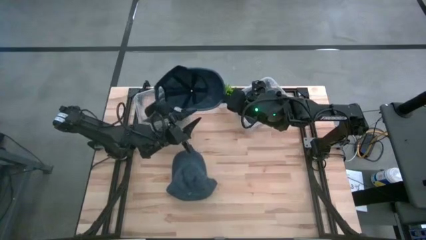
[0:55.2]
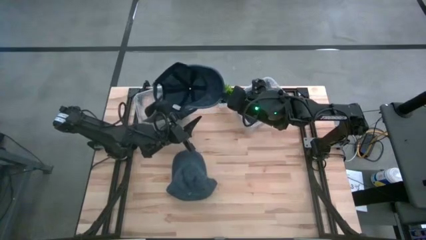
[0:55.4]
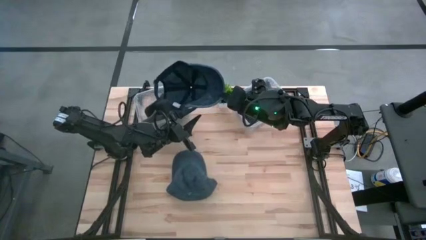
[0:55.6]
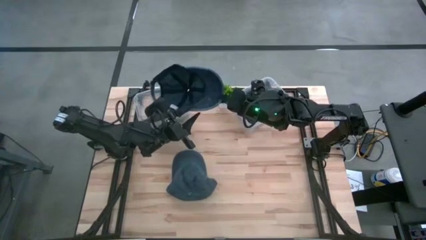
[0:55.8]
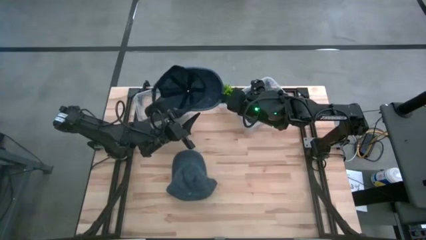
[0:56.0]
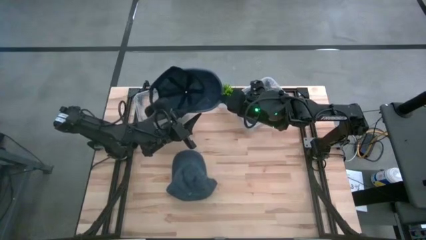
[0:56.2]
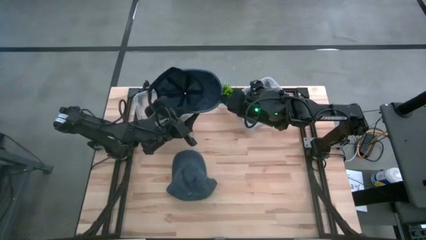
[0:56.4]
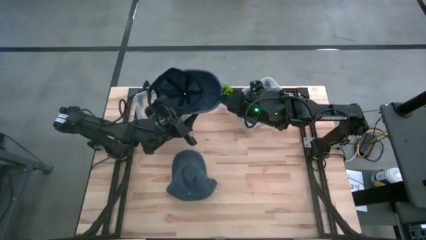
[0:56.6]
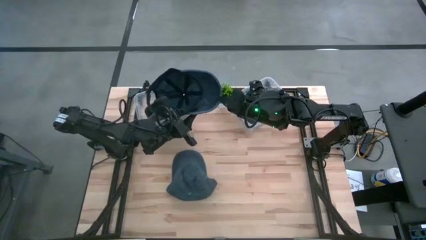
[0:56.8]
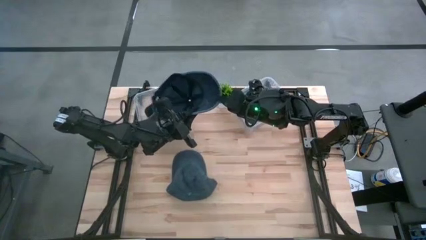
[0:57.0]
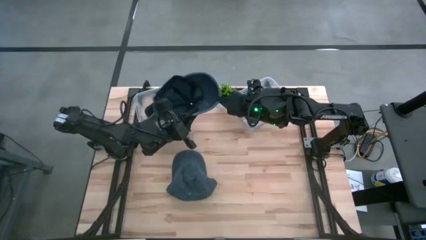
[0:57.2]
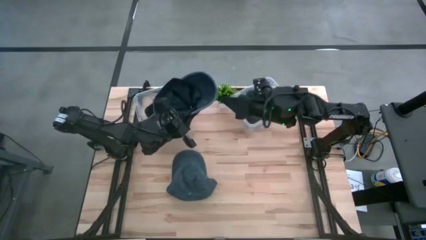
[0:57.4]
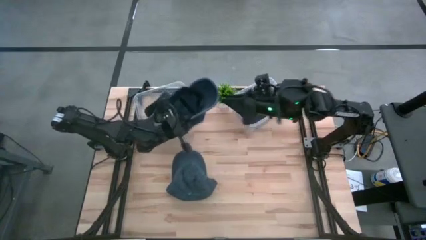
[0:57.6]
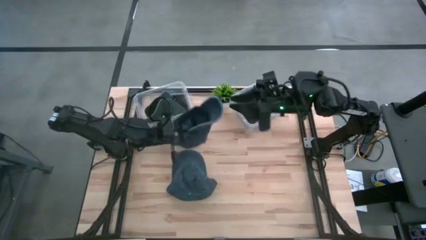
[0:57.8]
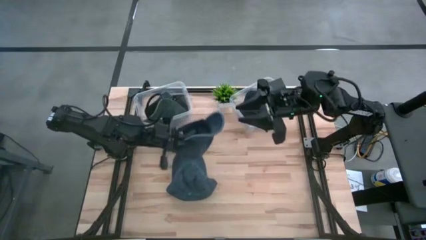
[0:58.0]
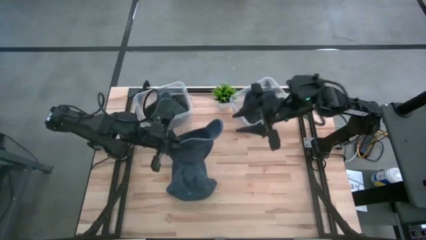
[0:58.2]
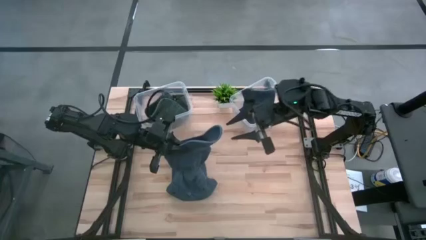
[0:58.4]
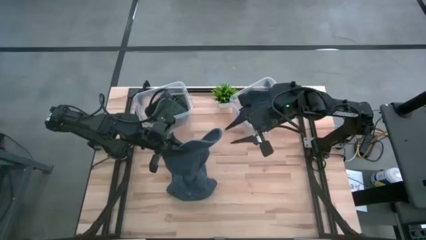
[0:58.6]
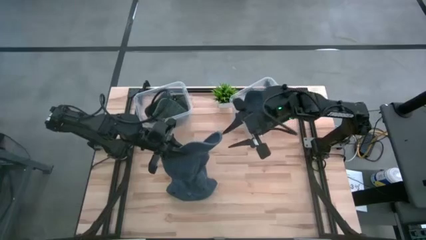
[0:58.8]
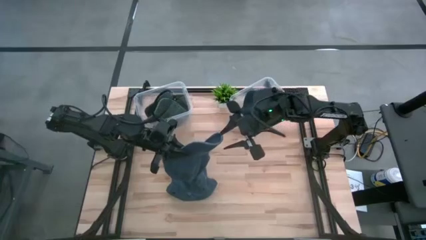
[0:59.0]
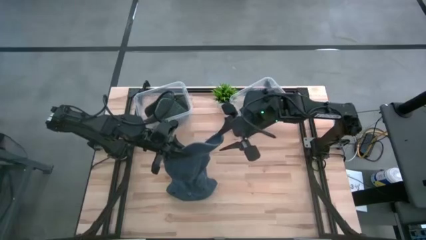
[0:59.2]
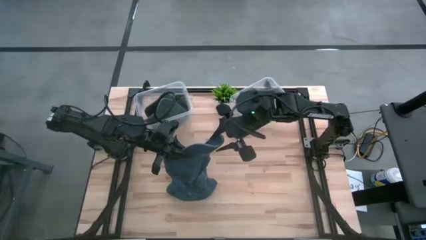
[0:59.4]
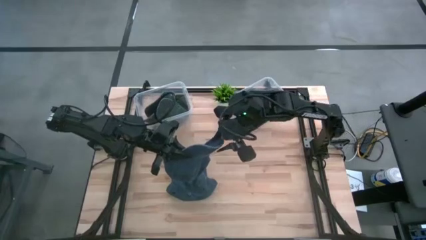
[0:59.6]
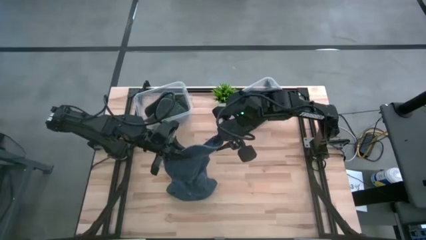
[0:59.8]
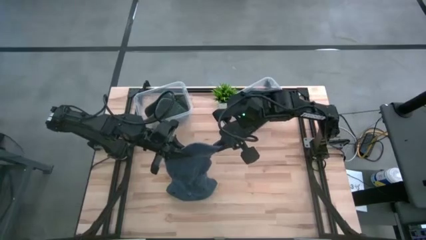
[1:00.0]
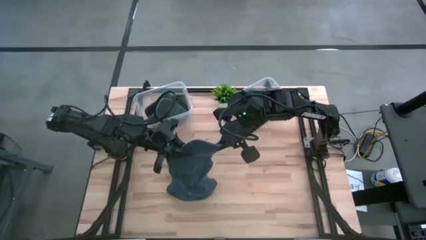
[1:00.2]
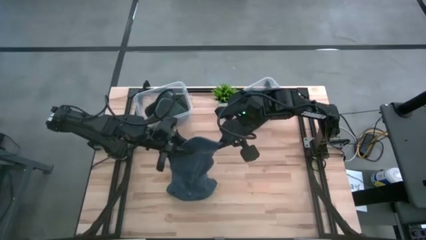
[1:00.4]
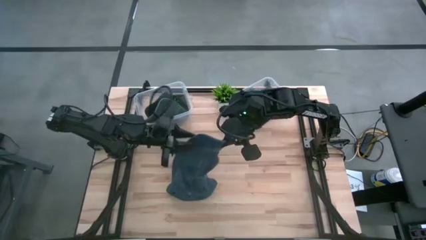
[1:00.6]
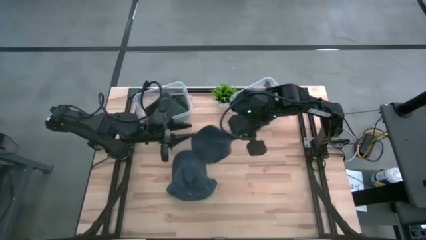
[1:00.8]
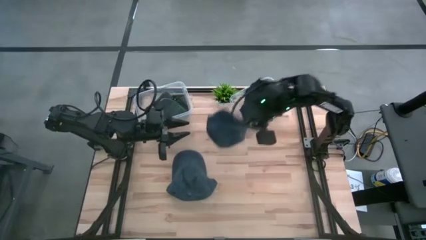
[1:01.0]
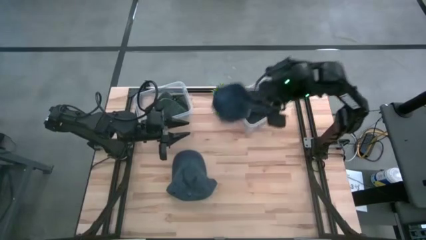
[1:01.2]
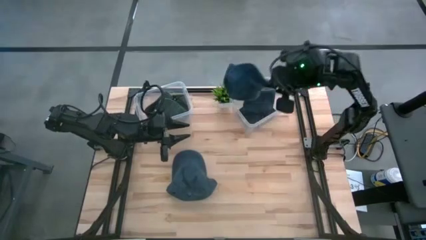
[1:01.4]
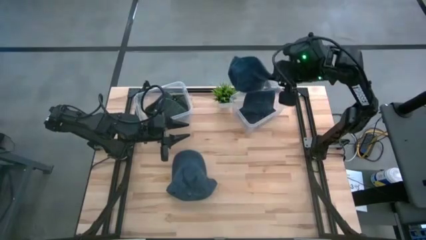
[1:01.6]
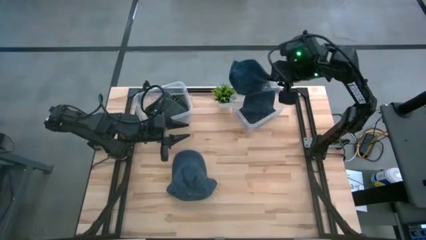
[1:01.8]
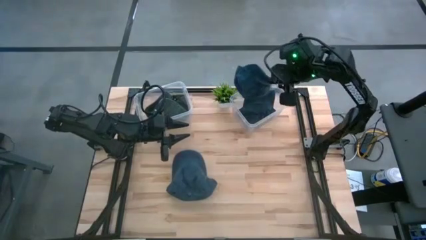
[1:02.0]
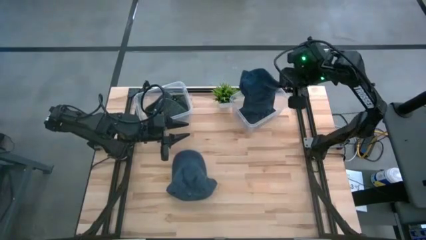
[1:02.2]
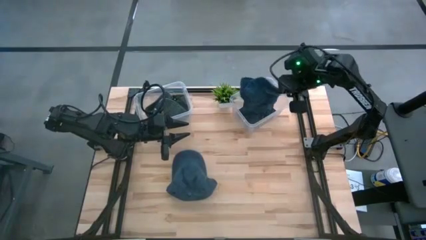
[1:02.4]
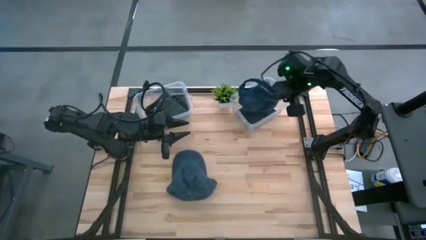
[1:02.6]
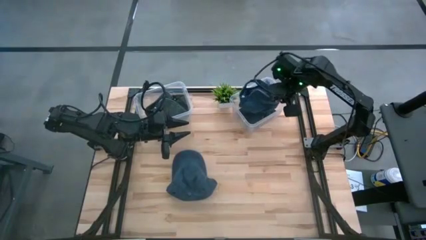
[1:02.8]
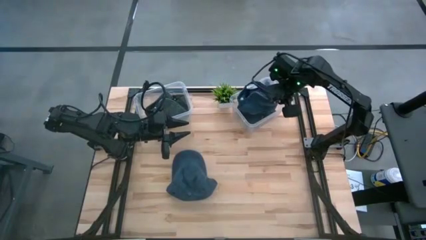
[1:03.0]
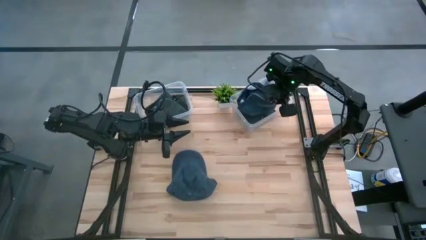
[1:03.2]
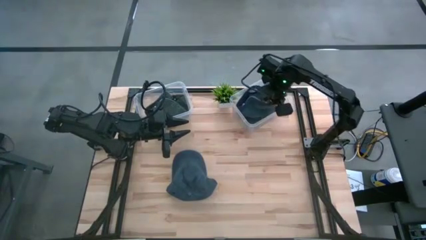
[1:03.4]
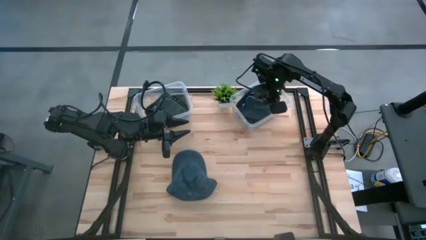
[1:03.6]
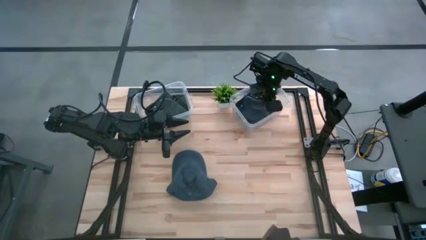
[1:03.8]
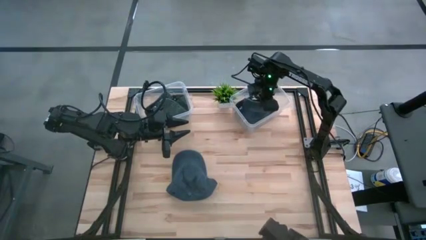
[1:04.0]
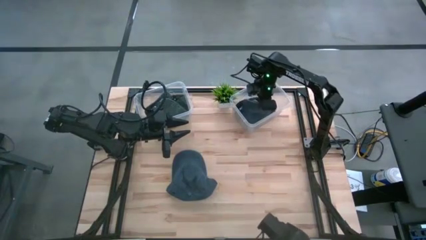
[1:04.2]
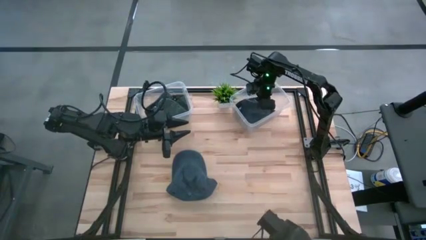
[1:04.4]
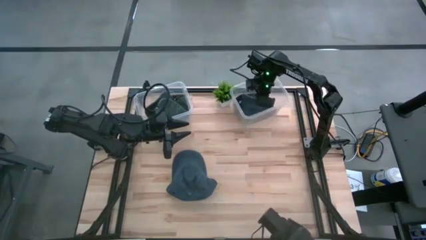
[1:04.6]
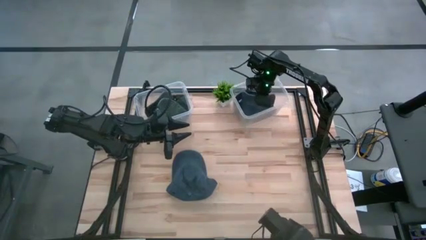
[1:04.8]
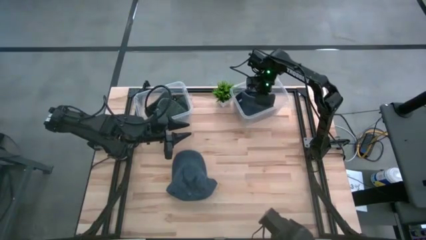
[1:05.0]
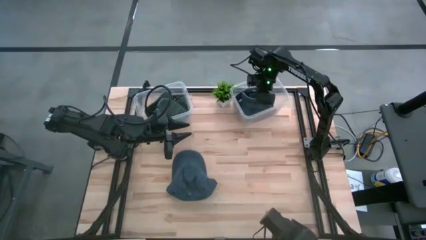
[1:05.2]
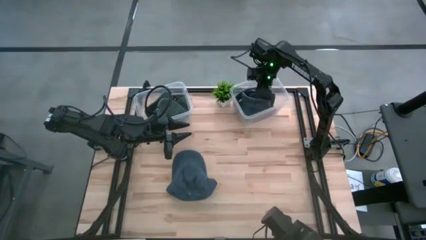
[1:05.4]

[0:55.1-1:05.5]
Task: Pick & Place hat
Put the right blue cap into the right transparent bin

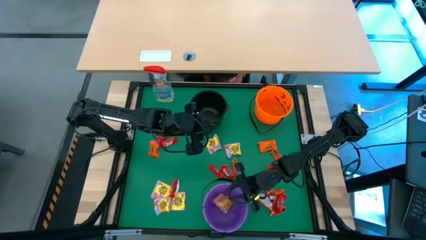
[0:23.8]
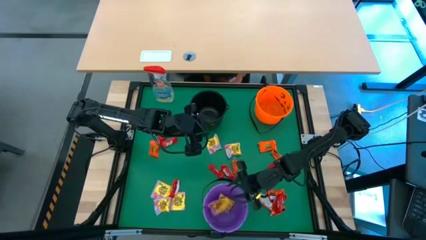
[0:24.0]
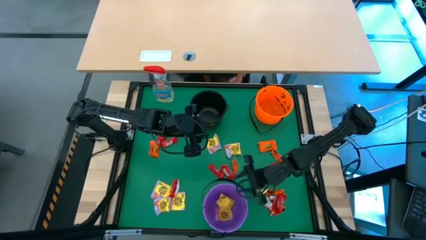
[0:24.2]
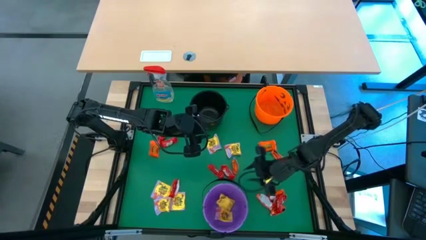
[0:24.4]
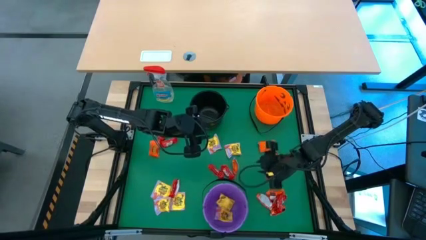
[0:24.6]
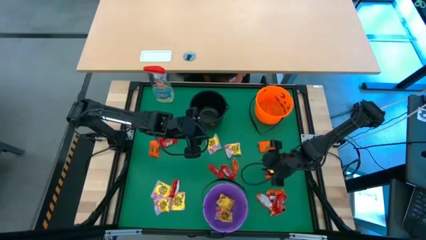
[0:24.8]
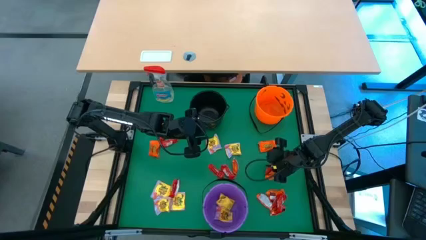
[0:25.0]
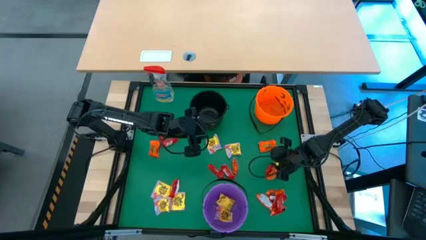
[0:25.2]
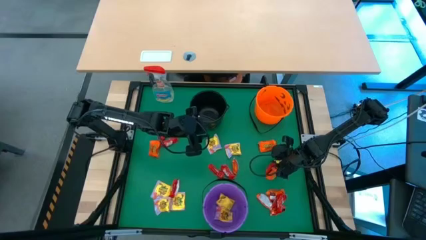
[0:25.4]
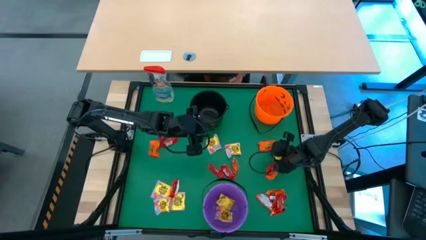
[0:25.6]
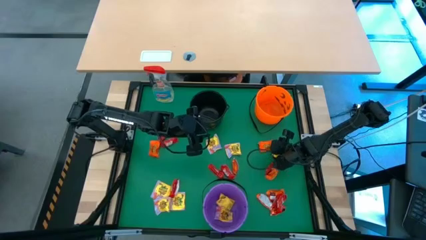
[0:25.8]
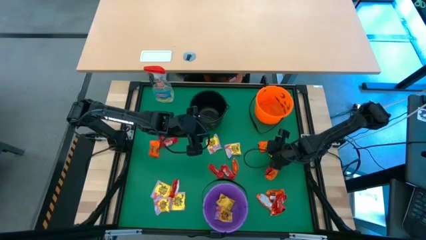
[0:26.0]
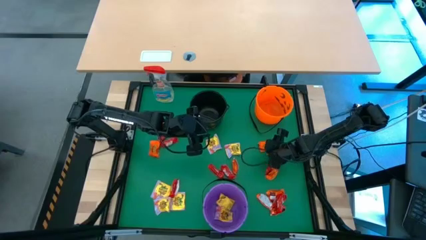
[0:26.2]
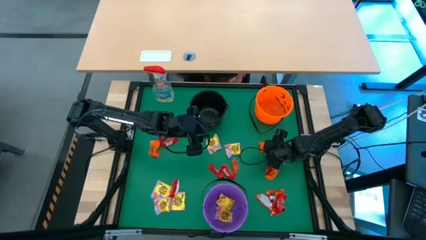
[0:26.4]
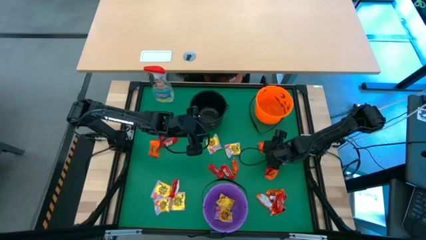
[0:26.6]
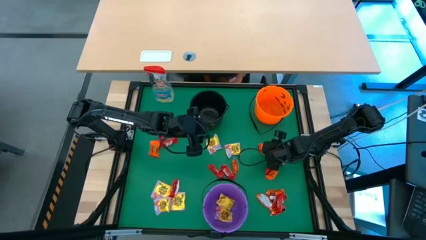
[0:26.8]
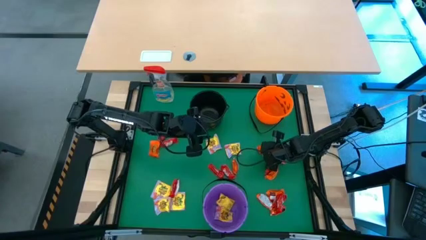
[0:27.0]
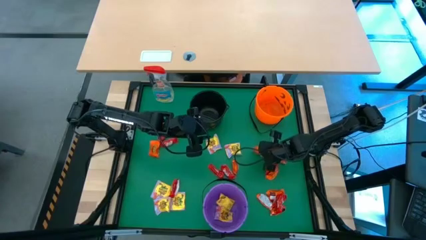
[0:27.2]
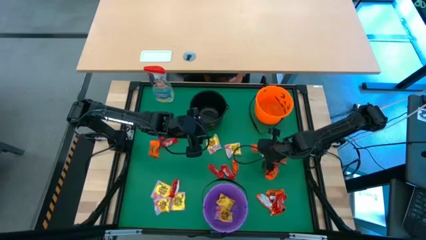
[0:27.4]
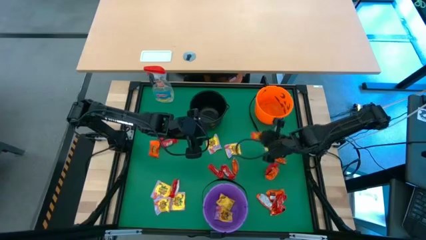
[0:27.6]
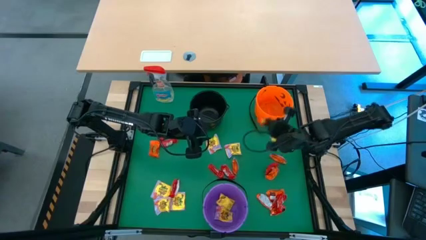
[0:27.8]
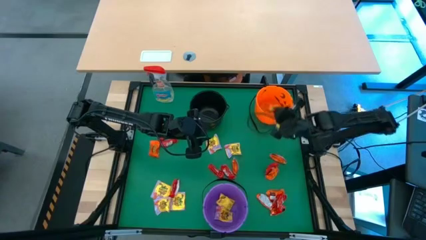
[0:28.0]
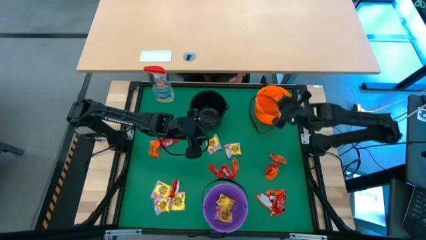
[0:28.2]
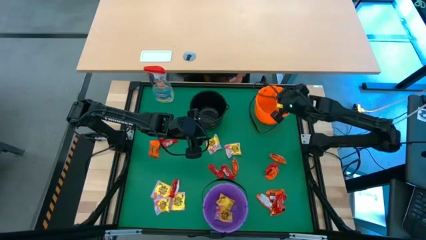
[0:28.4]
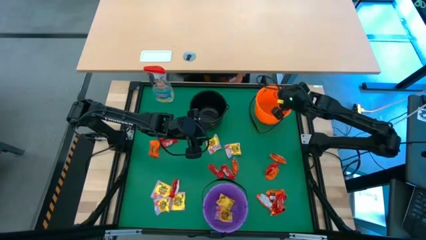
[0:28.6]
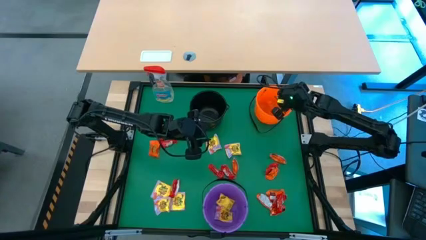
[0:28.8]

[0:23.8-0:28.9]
Task: Sort candy
Put the orange chocolate into the orange bucket
